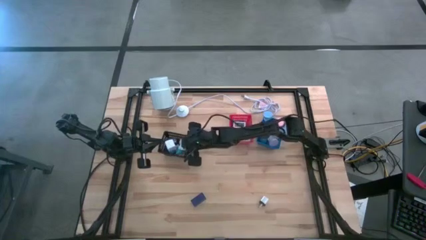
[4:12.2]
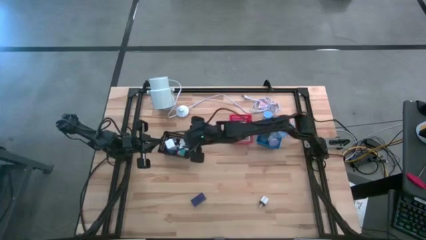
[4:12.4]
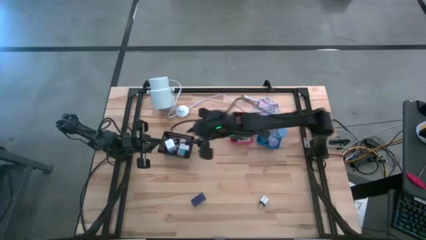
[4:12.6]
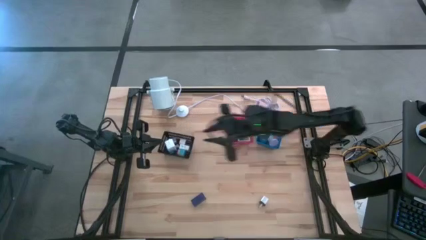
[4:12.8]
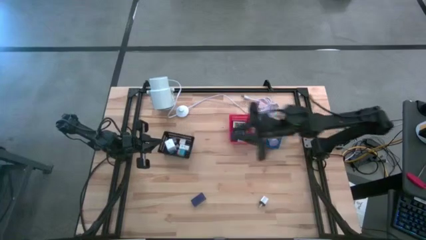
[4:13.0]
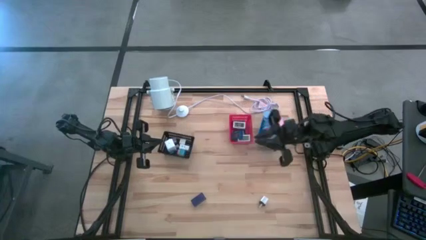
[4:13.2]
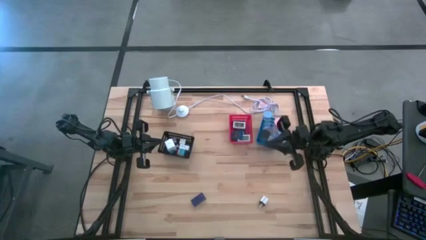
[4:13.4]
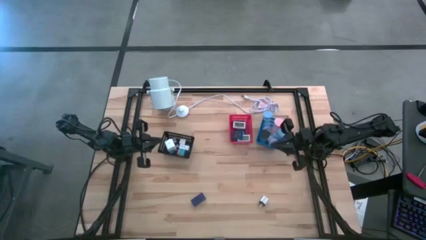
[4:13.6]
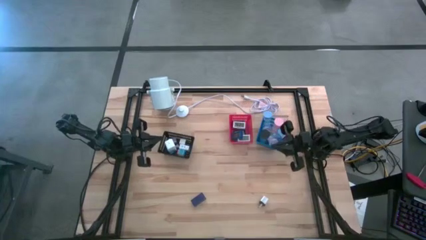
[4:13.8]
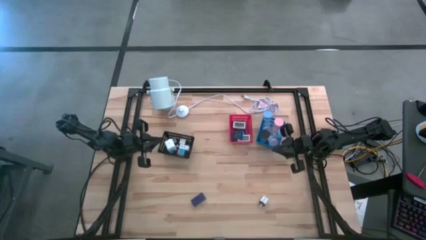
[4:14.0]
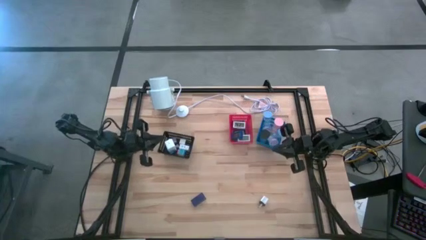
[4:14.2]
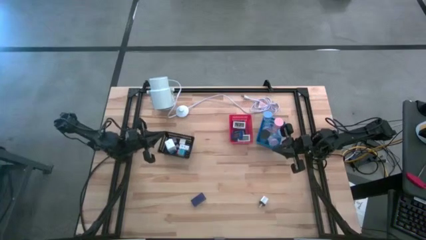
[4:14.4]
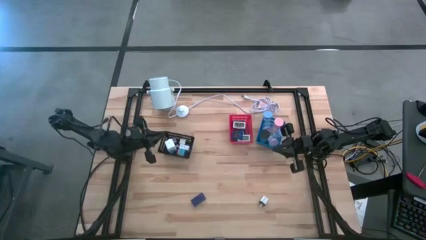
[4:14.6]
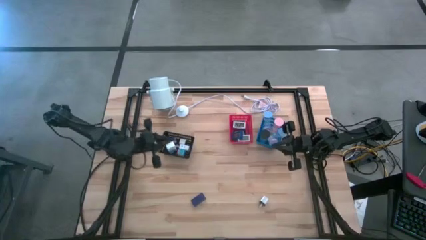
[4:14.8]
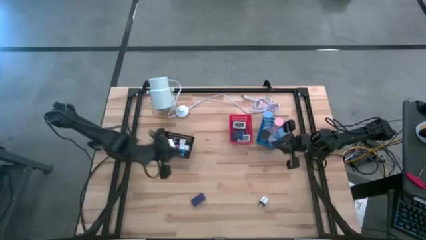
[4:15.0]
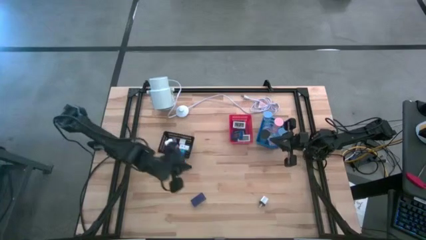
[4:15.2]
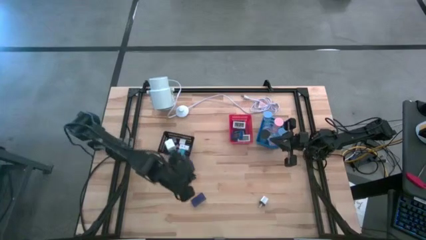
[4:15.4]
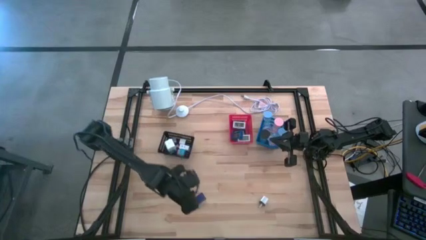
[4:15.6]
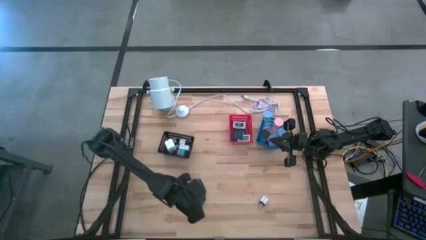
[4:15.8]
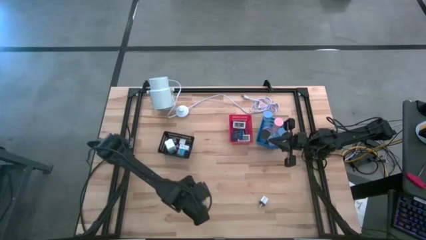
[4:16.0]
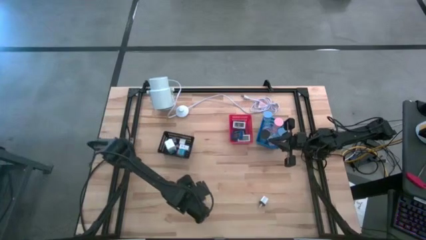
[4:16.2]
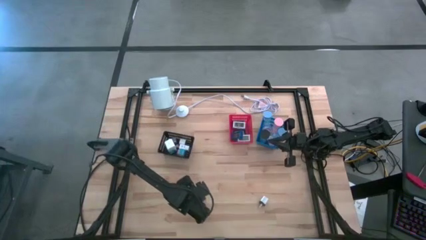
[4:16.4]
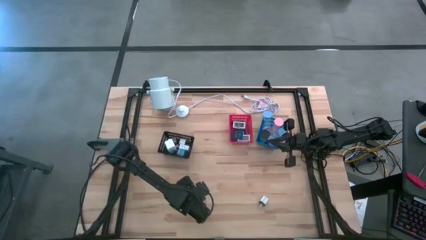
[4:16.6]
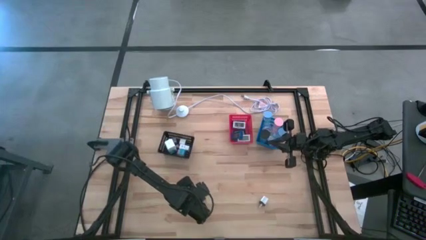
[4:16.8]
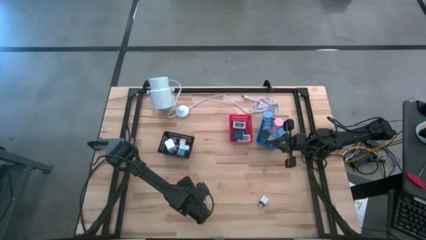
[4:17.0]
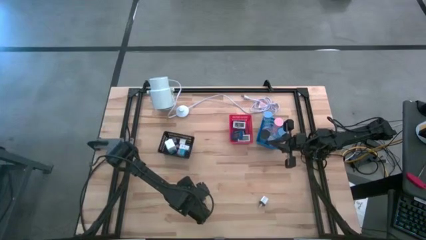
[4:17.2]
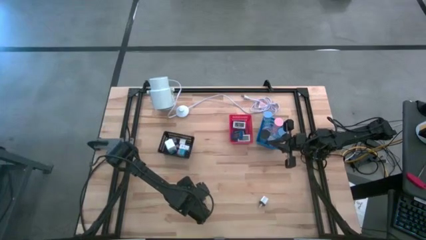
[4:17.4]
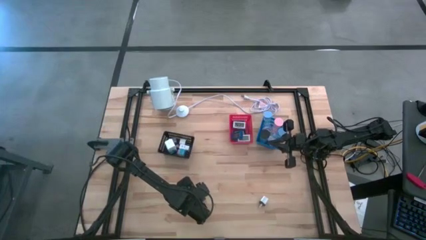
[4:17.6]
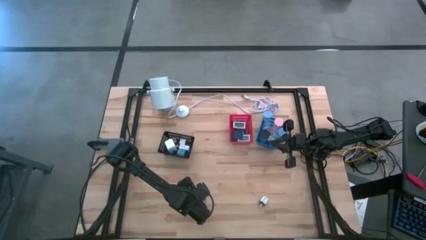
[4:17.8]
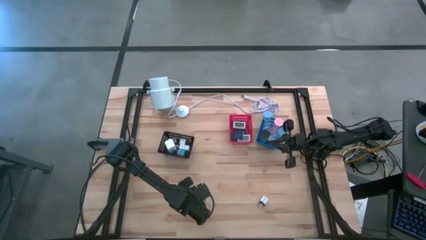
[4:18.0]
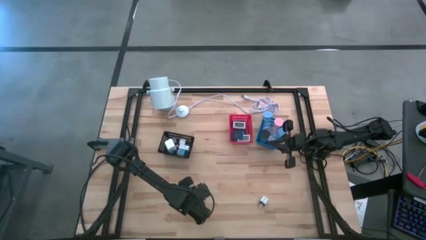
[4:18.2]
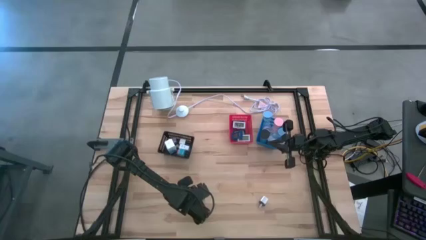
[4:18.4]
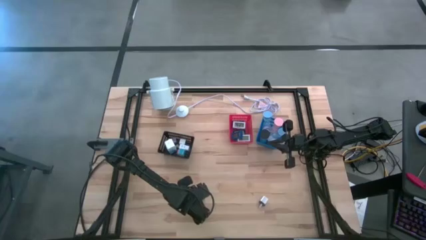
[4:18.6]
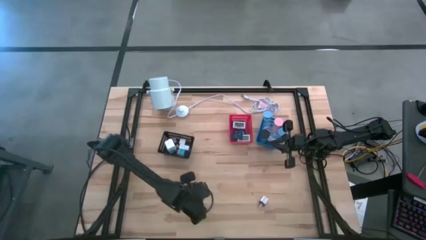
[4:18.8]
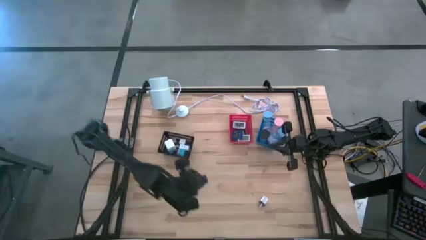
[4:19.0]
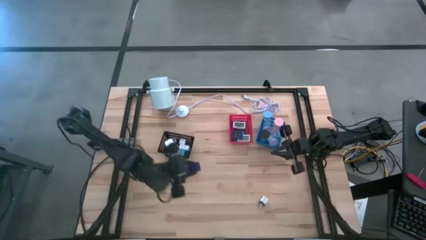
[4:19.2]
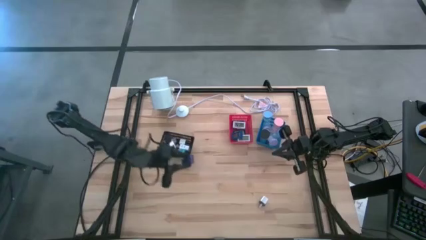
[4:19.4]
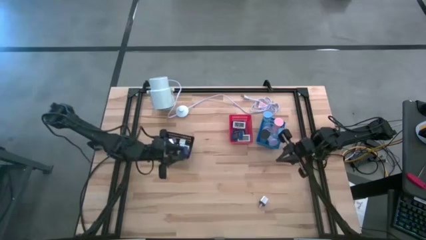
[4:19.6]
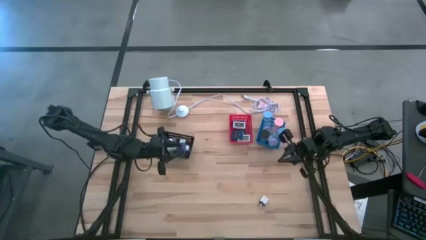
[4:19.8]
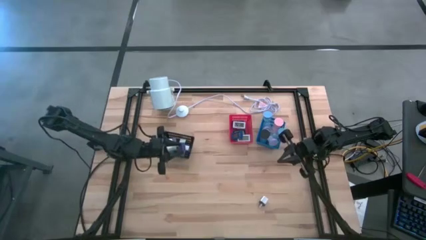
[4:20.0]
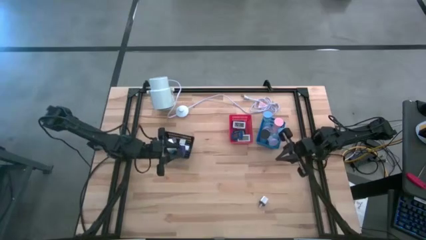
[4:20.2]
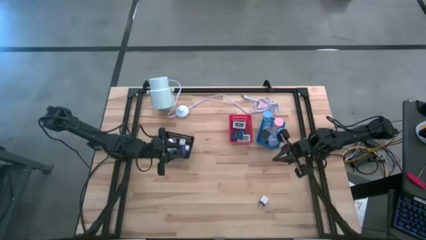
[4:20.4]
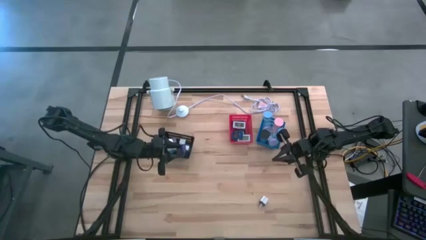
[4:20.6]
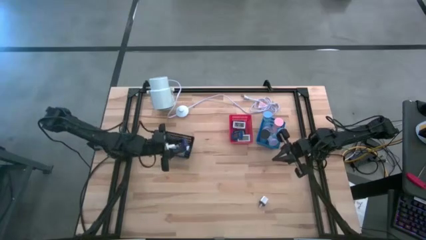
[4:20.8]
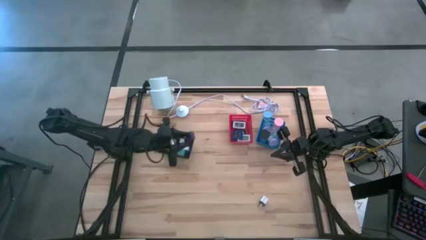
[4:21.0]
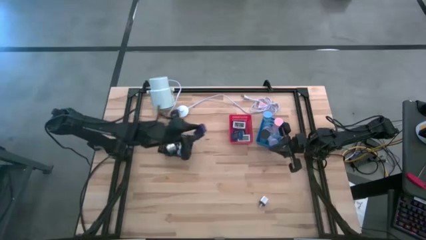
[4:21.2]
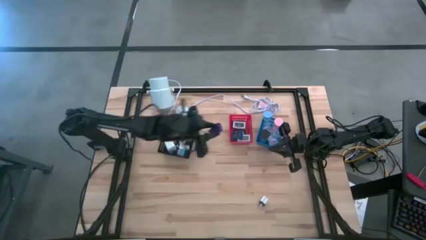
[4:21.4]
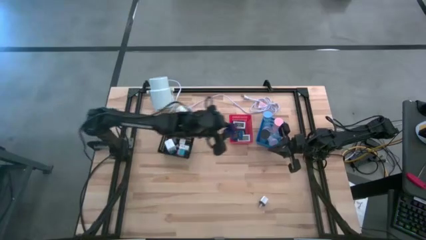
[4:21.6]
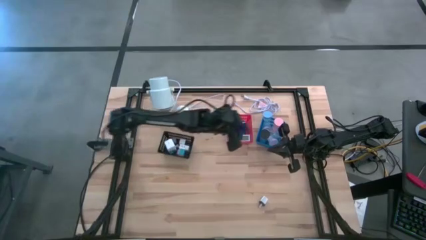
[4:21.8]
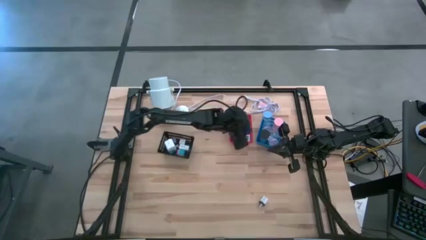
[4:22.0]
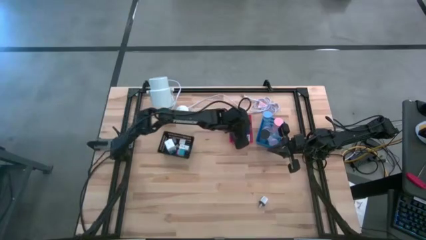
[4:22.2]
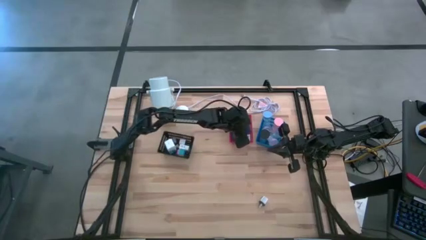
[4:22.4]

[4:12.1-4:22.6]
Task: Pick & Place Office items
Put the dark blue digital clock into the red bin

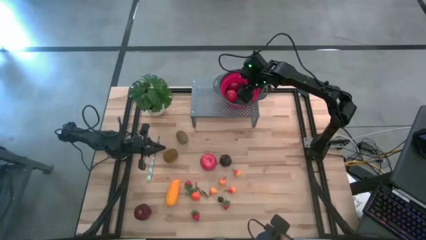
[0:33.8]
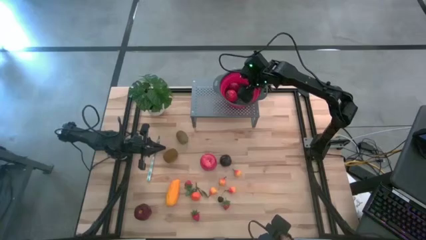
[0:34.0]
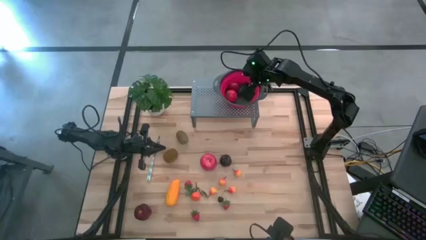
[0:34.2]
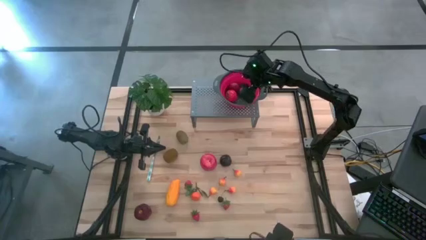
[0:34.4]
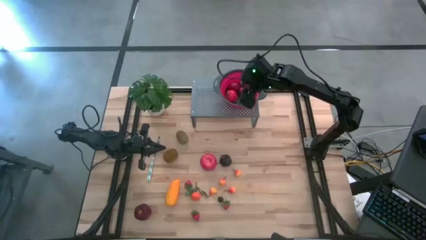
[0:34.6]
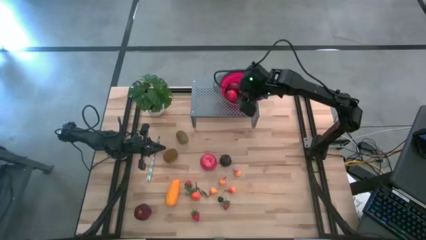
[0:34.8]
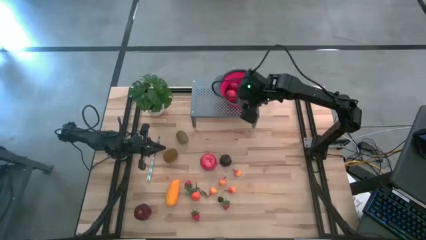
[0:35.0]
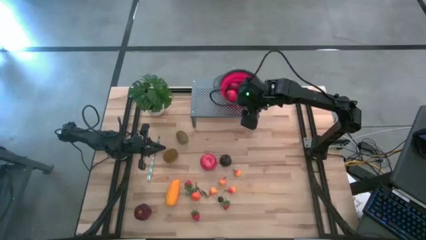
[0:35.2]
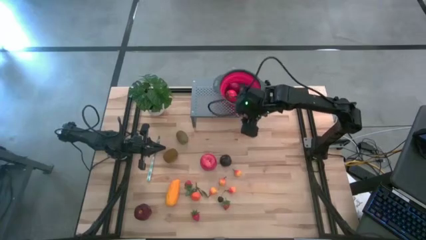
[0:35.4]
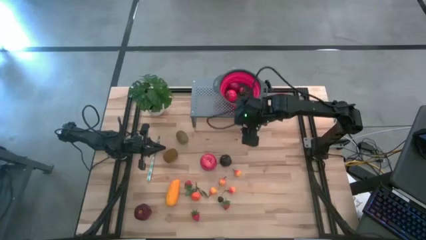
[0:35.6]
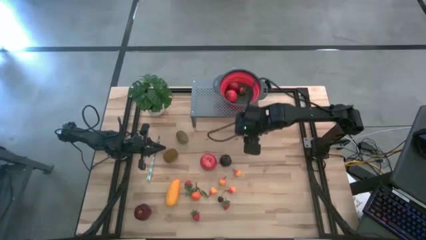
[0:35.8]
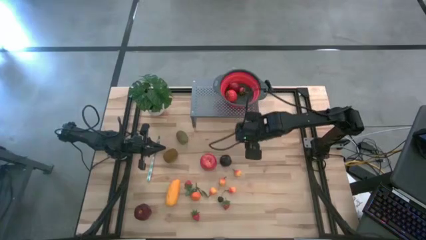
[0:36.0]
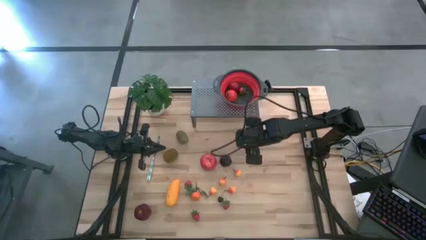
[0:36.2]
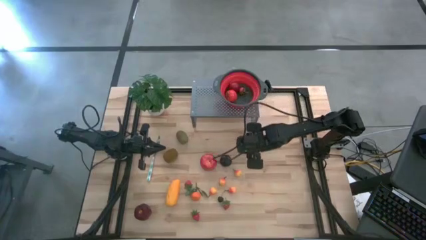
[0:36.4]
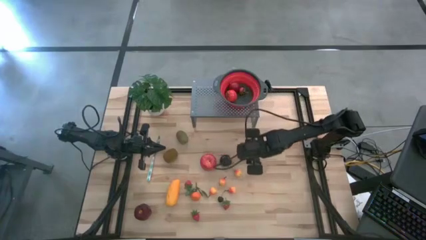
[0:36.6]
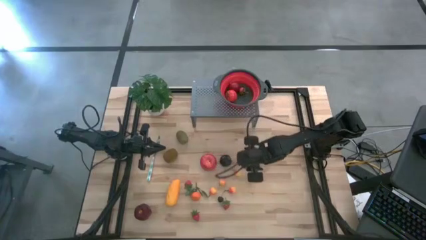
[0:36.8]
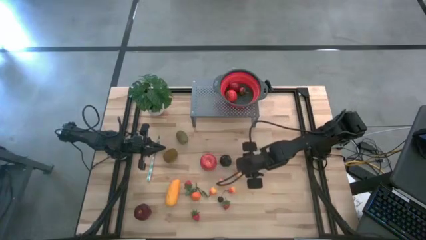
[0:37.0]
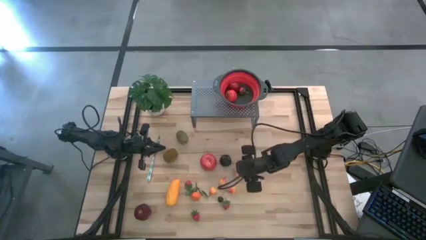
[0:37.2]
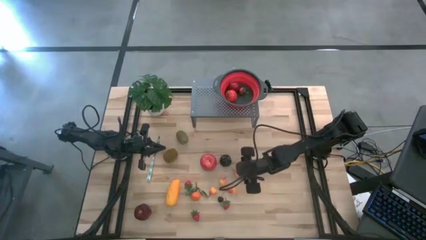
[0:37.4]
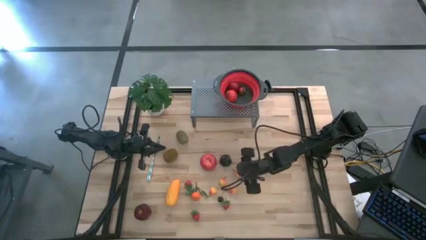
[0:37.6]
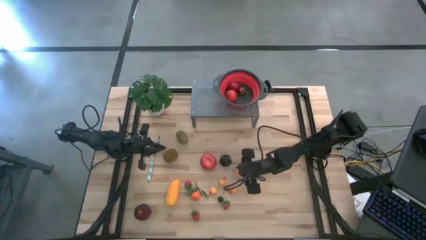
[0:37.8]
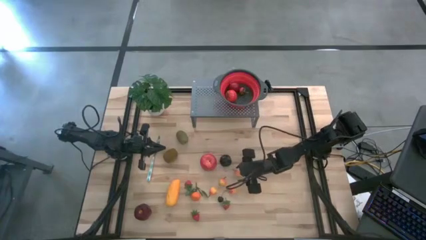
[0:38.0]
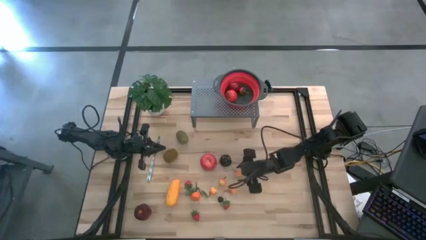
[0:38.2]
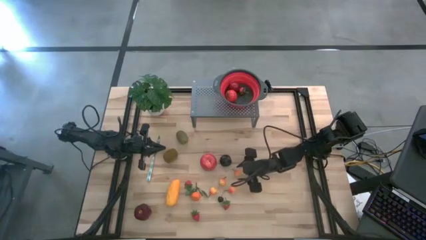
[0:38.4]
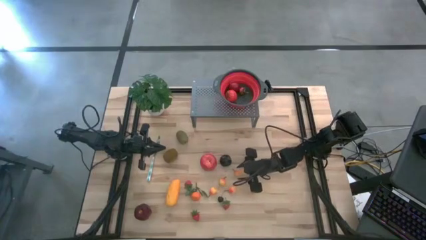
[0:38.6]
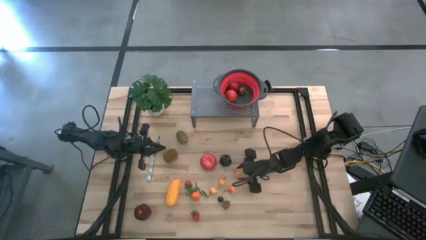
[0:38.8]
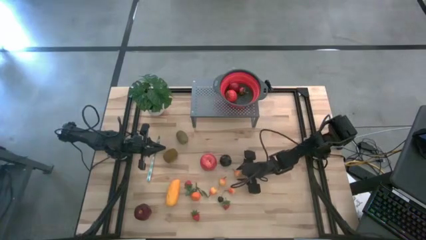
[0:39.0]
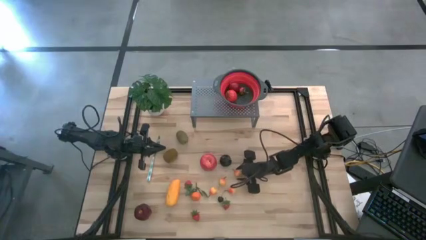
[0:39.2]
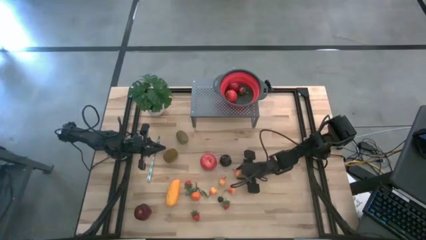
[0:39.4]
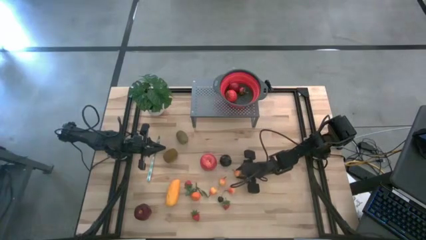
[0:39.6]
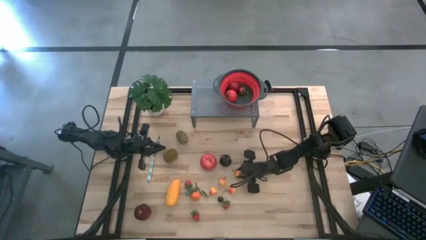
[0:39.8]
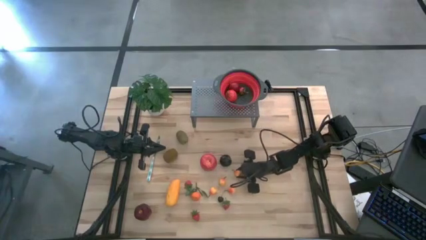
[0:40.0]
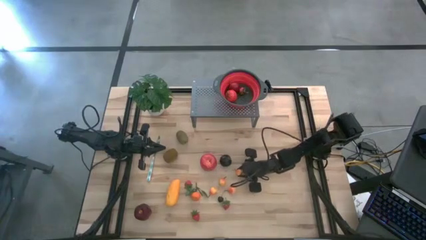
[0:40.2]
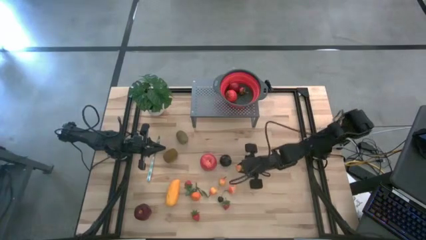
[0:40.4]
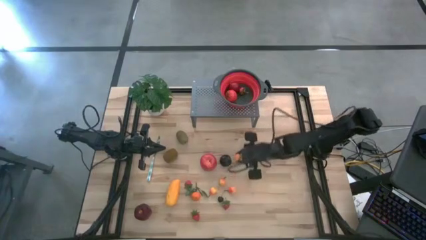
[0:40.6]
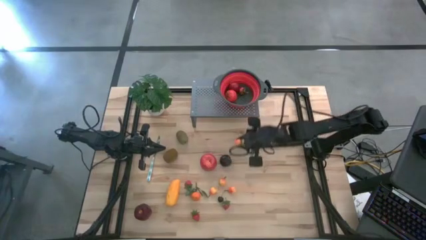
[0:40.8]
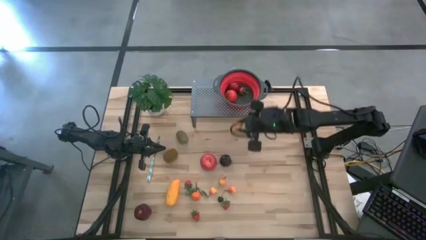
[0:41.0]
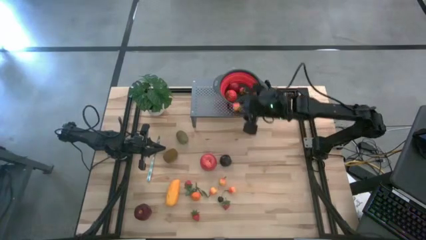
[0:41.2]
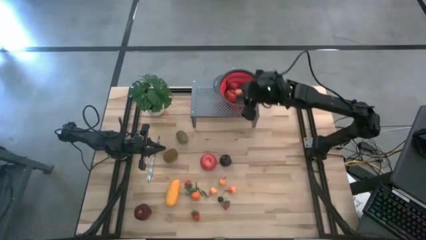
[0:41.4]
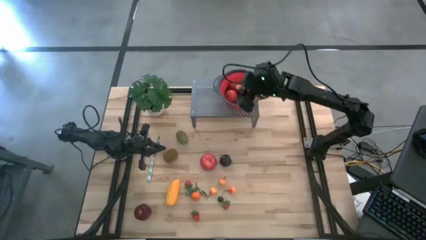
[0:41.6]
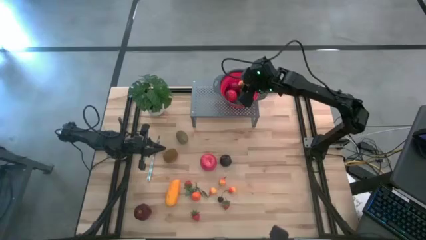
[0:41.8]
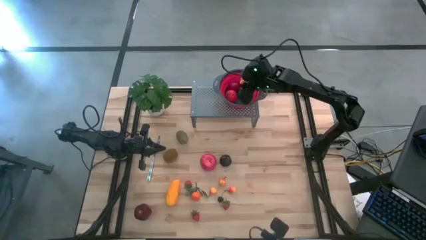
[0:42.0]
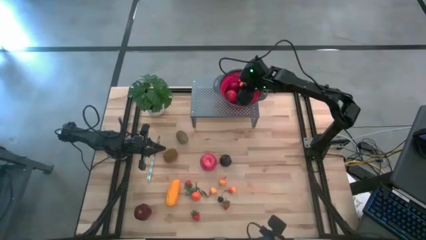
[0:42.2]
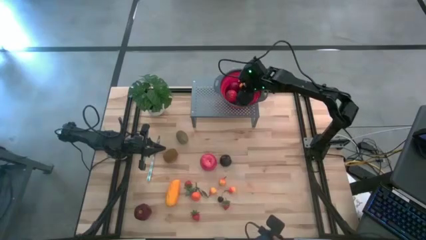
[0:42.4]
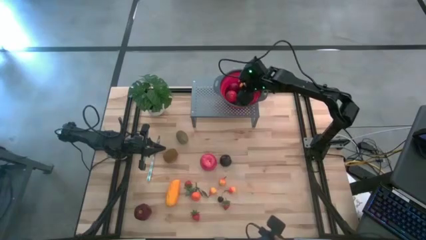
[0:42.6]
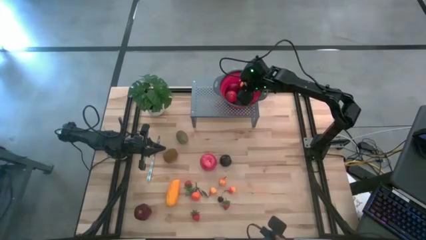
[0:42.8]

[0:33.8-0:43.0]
Task: Pick & Place Fruit
Put the peach into the strainer bowl on the shelf
